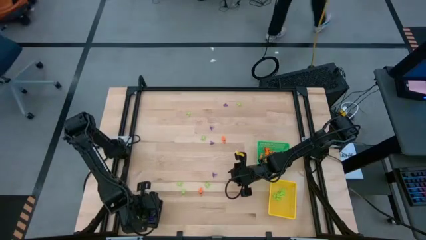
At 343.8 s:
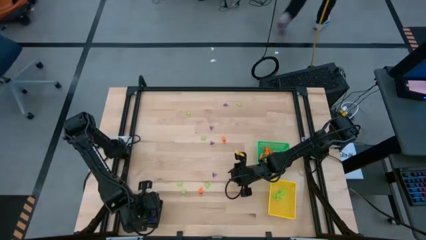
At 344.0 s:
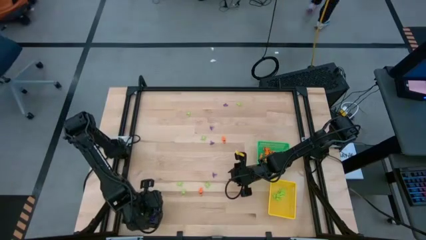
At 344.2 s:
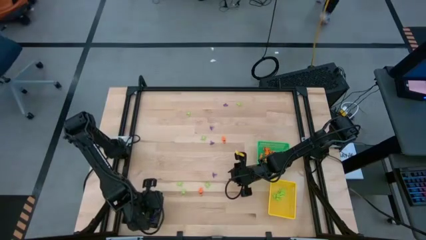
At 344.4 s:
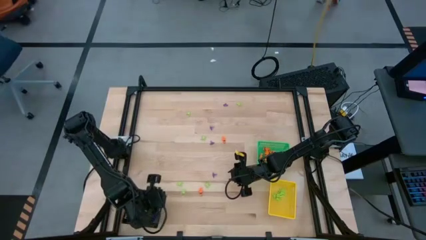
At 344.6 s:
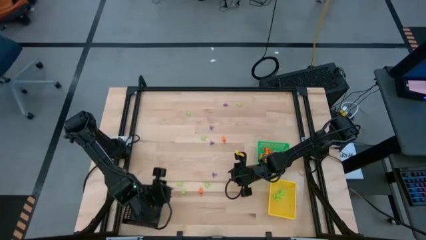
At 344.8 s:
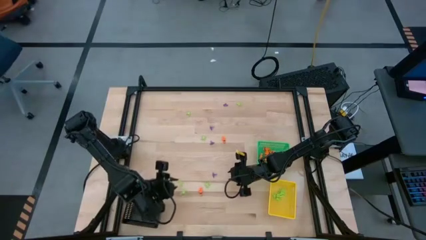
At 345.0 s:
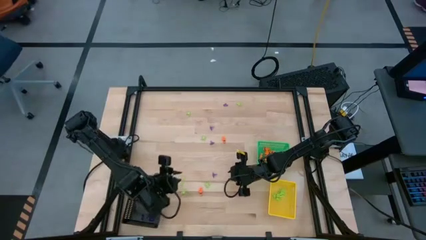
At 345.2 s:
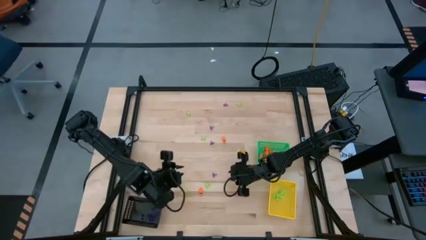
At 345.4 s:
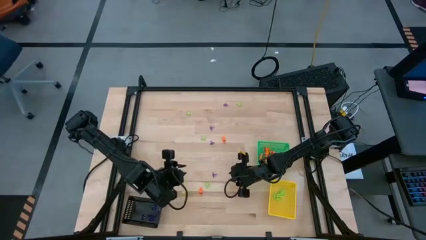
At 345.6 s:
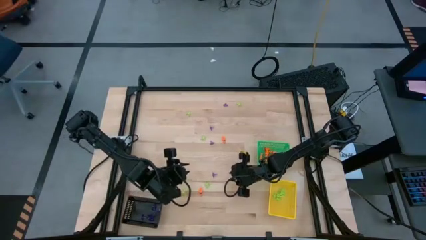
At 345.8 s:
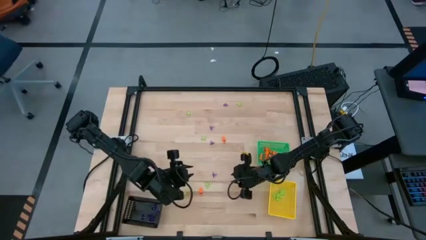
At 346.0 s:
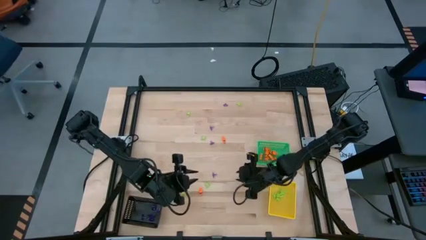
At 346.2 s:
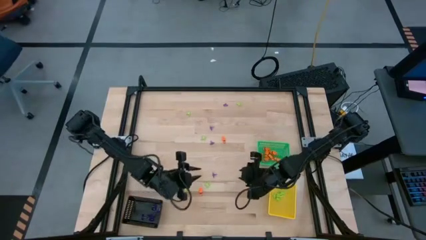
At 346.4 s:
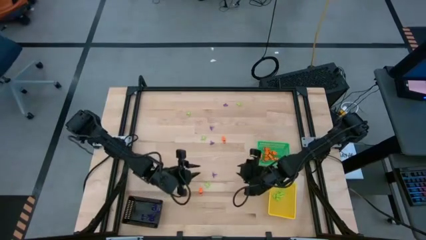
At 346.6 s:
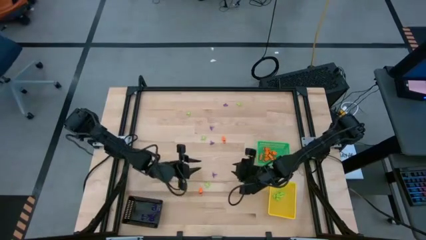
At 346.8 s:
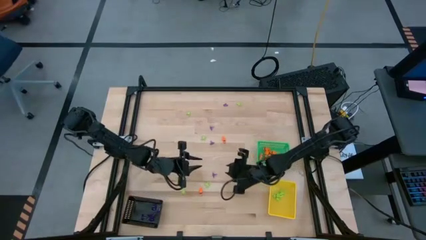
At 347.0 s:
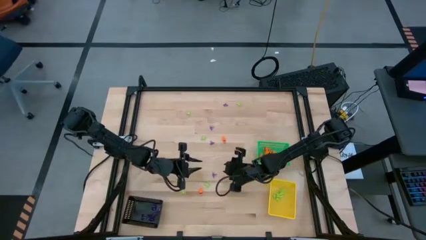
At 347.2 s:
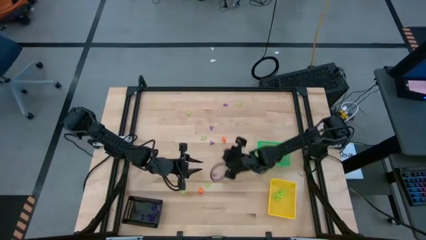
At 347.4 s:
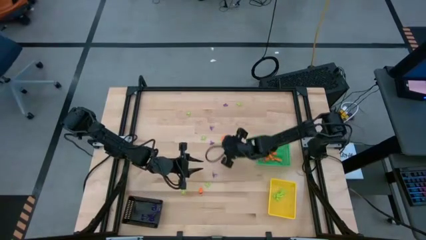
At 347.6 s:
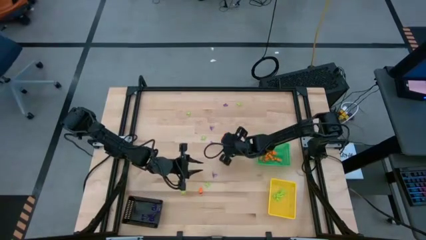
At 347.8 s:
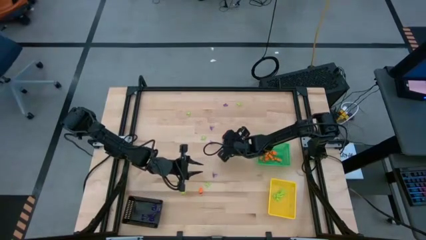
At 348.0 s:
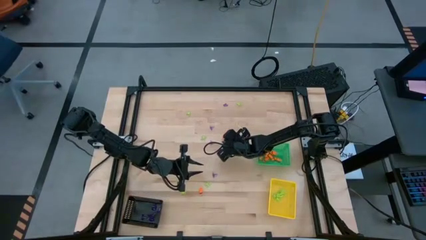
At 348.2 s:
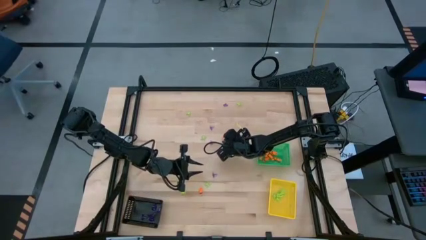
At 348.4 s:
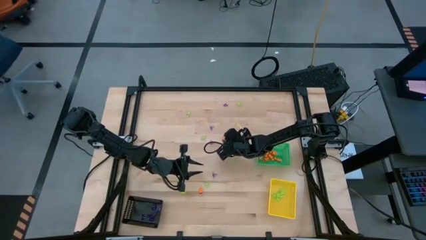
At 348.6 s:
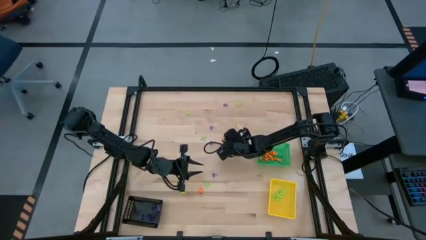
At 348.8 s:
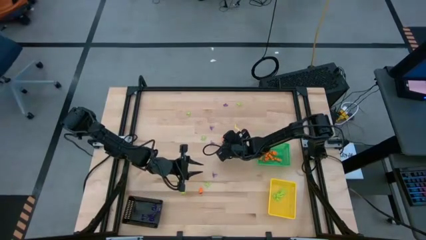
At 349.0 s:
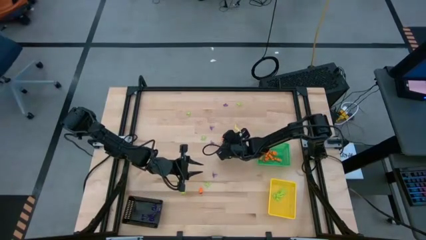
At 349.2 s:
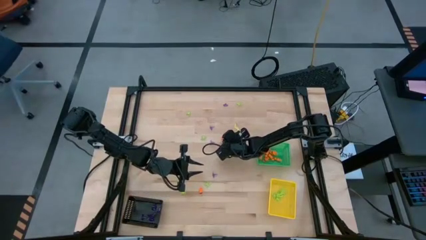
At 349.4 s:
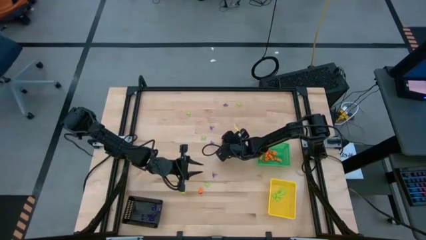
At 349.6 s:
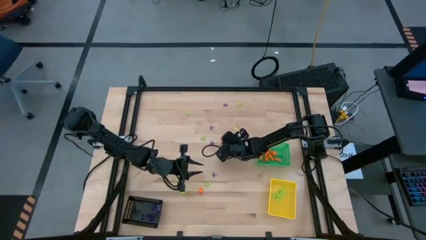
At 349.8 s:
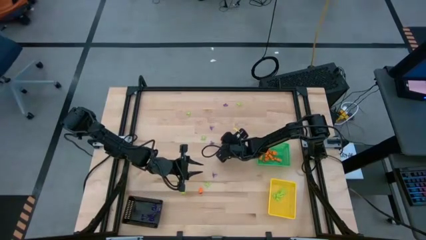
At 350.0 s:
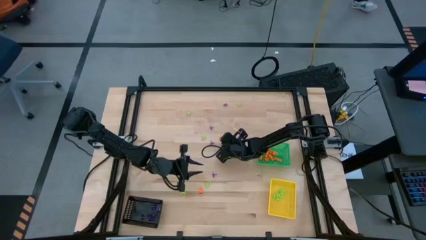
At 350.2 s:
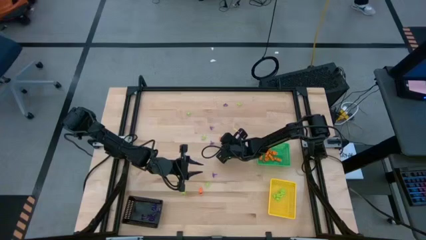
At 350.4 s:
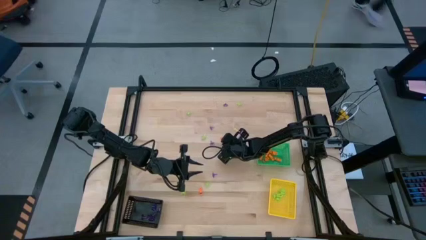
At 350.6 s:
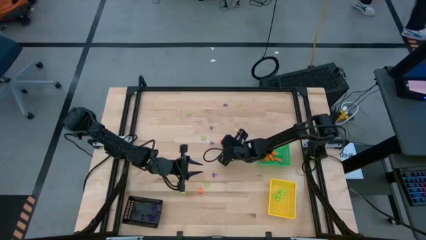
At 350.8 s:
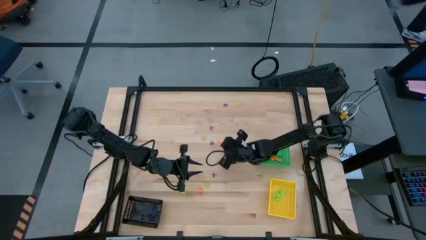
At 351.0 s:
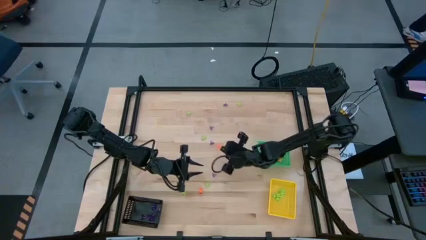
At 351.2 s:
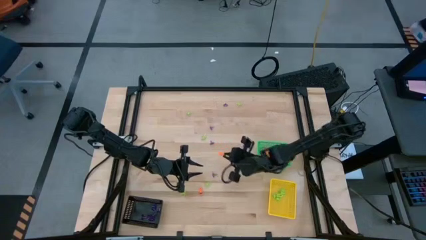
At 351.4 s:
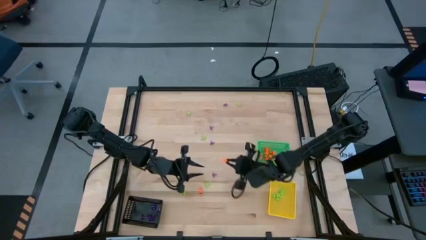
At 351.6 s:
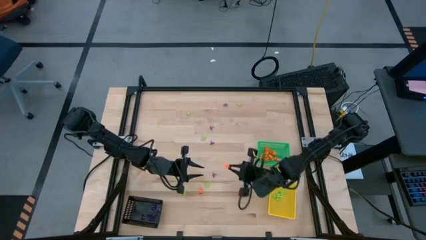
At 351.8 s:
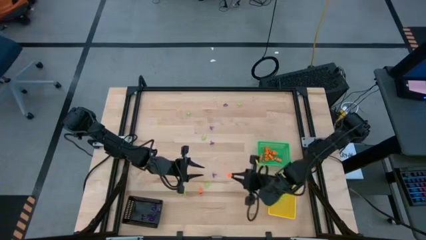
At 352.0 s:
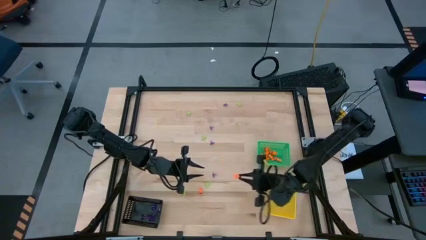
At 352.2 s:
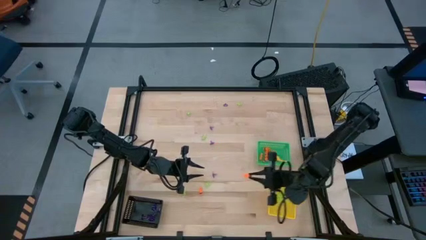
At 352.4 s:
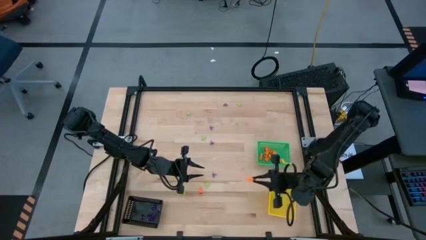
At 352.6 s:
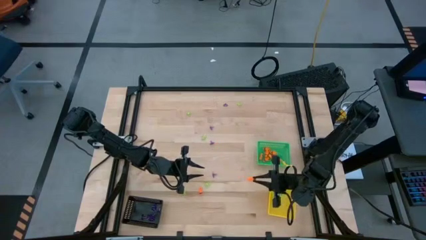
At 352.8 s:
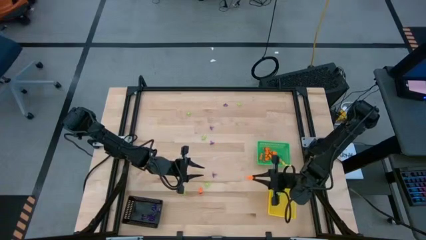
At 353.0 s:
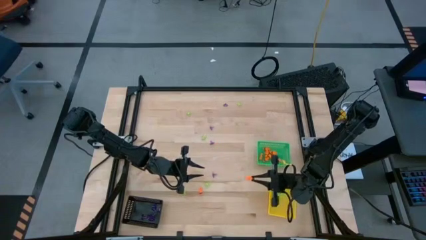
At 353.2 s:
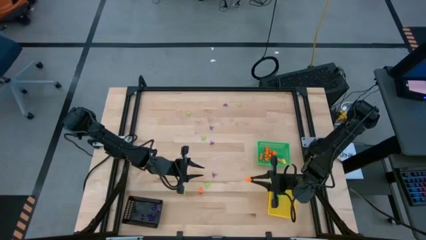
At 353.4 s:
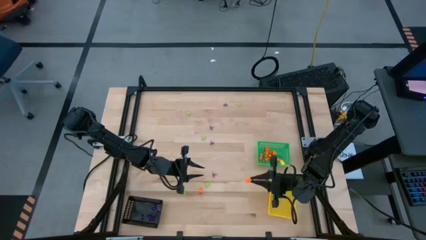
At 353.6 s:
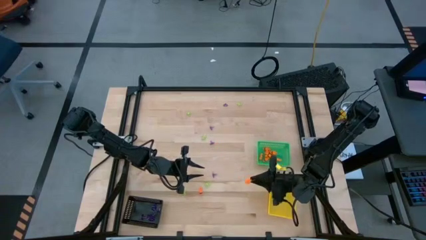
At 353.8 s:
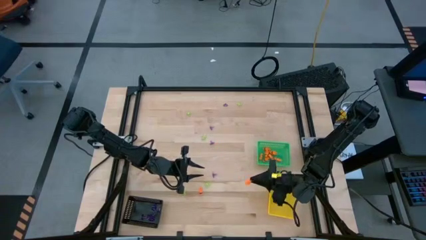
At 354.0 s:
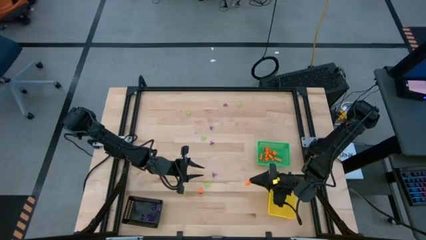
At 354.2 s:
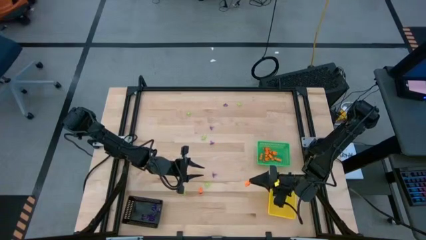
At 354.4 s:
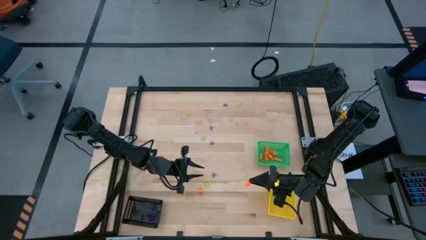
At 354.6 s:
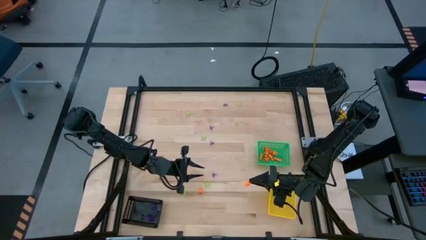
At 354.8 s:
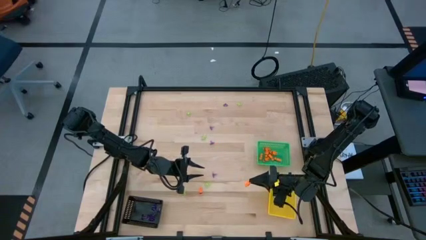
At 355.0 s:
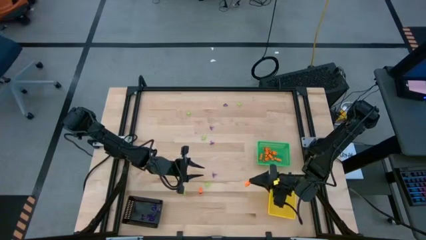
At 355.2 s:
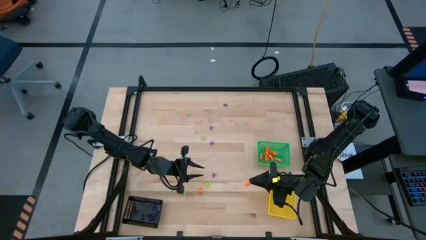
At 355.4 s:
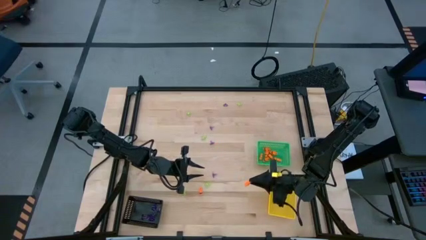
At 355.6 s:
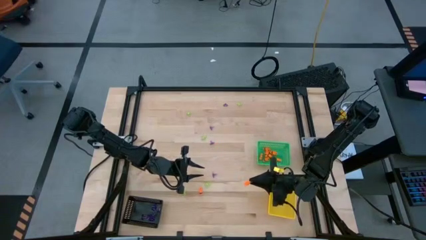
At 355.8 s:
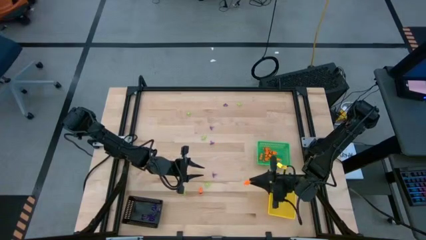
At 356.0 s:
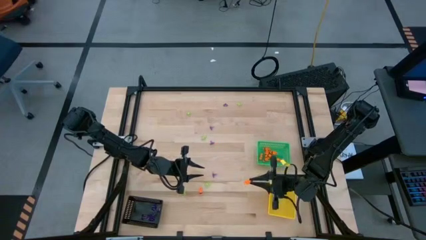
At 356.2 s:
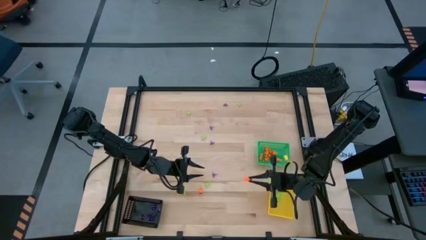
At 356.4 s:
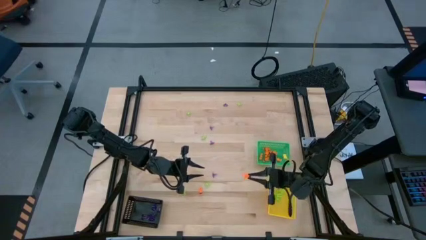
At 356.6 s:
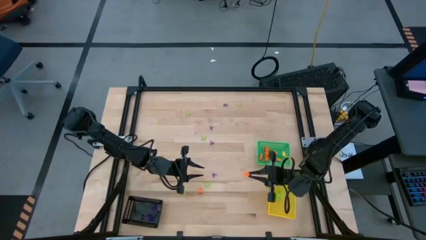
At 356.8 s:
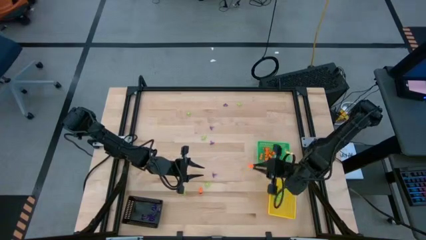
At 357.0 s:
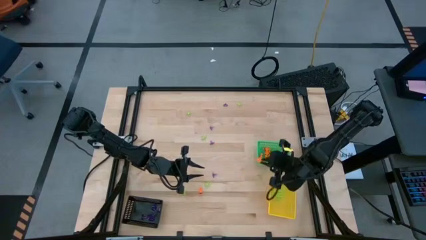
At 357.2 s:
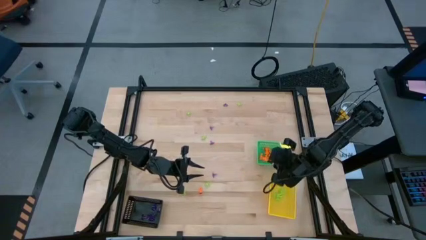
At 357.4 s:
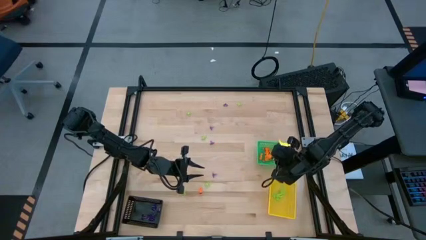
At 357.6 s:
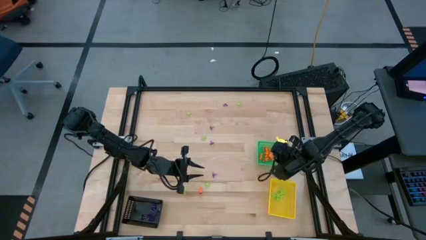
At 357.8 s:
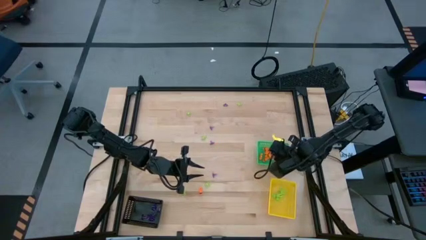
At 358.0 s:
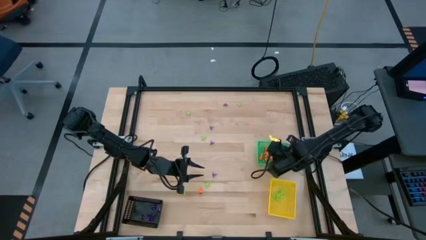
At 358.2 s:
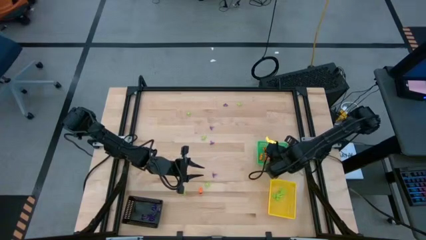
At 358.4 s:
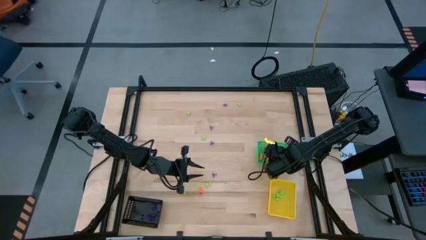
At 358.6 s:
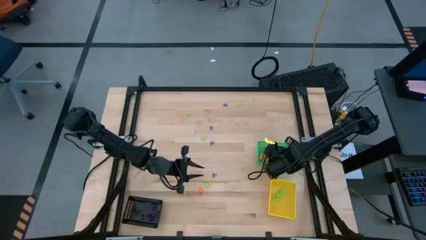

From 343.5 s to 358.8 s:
Task: Sort Halloween decoration
Put the orange skeleton toy into the green bin
